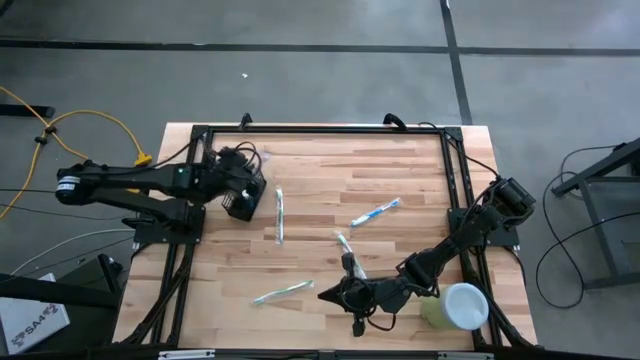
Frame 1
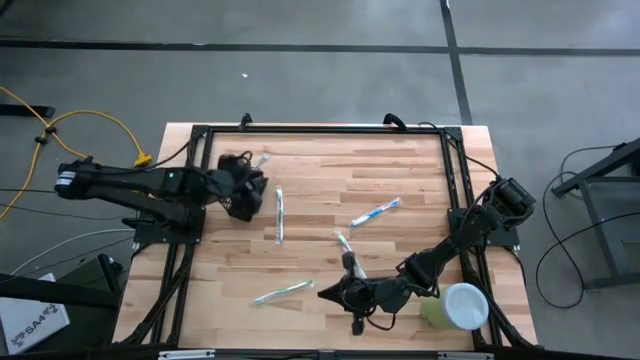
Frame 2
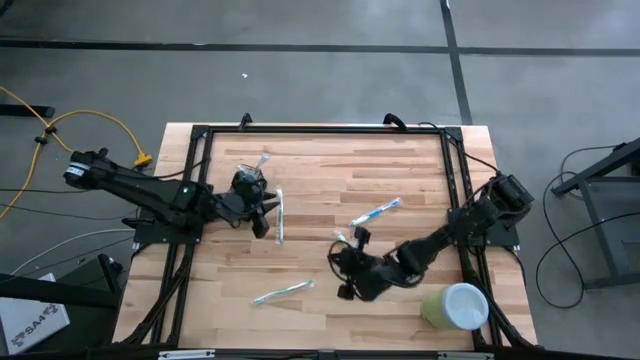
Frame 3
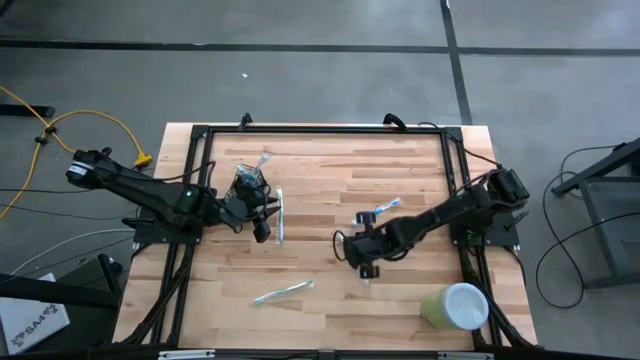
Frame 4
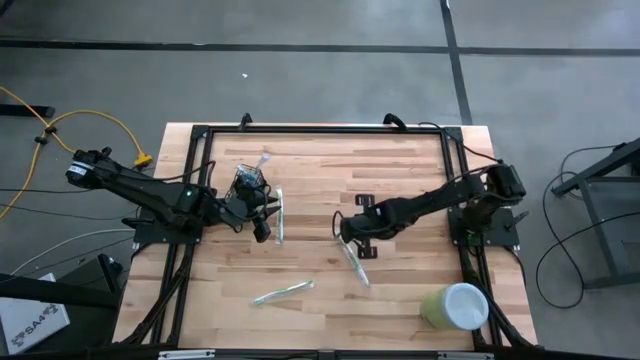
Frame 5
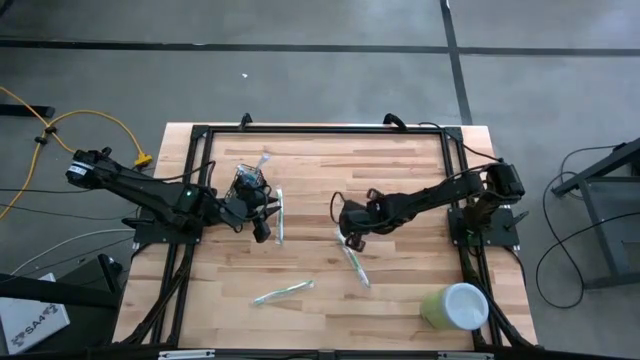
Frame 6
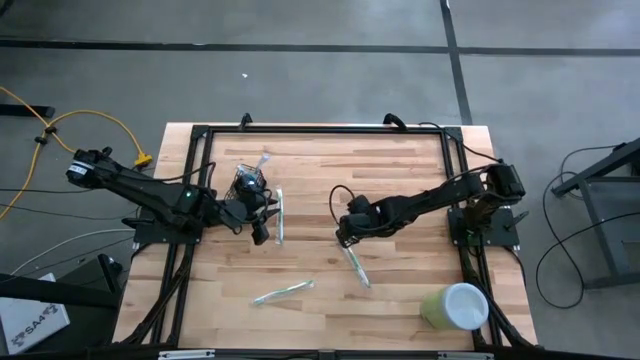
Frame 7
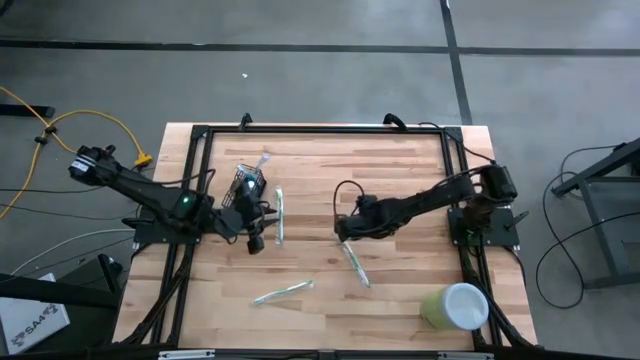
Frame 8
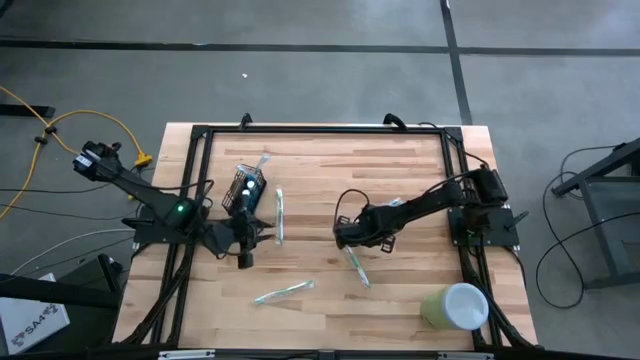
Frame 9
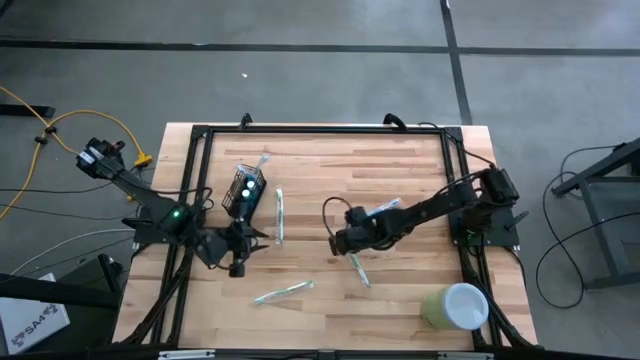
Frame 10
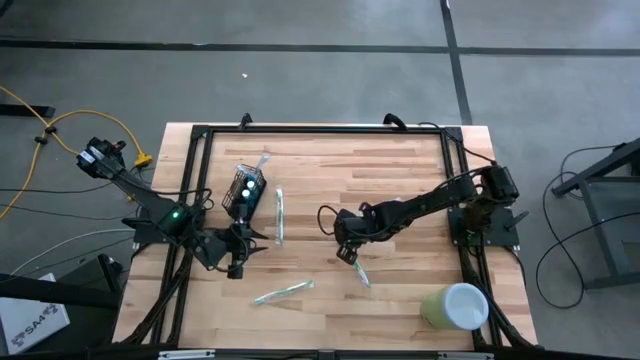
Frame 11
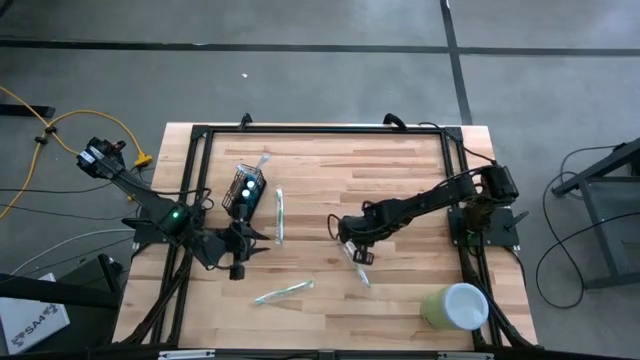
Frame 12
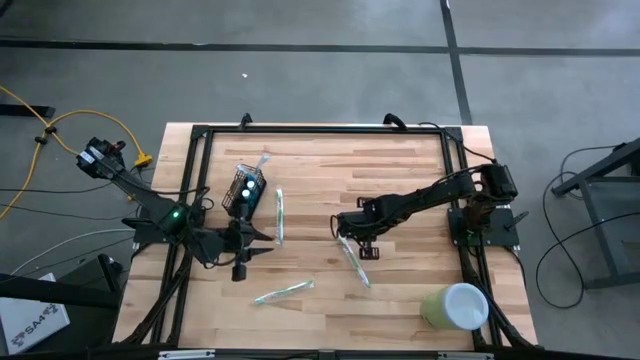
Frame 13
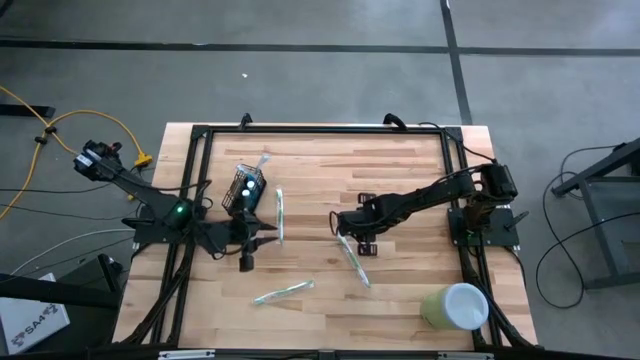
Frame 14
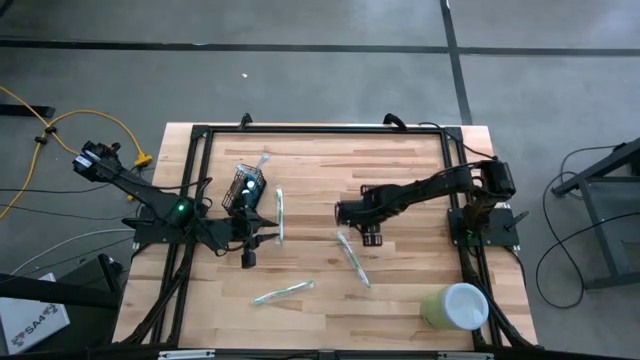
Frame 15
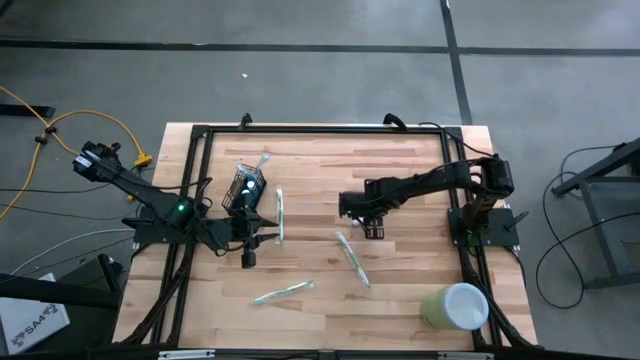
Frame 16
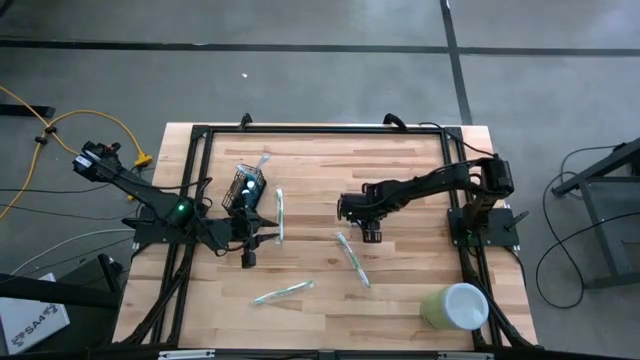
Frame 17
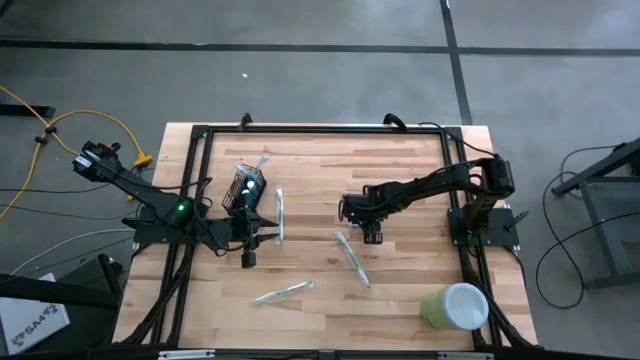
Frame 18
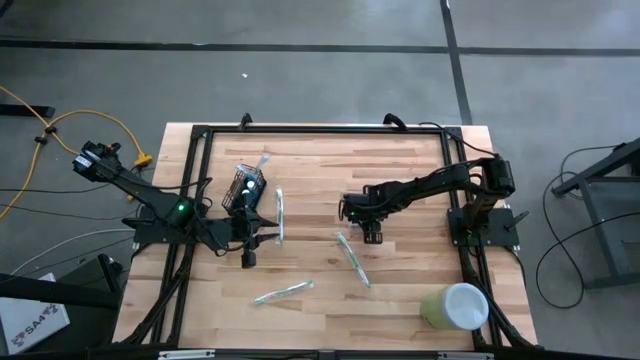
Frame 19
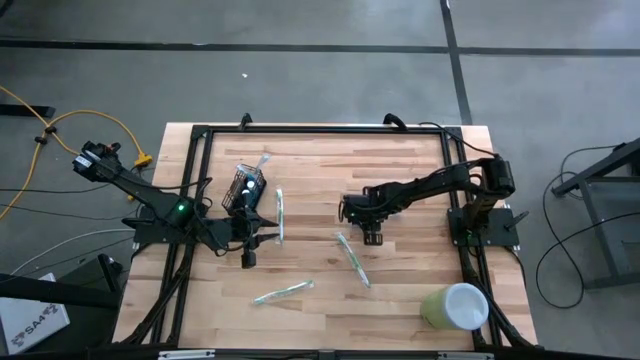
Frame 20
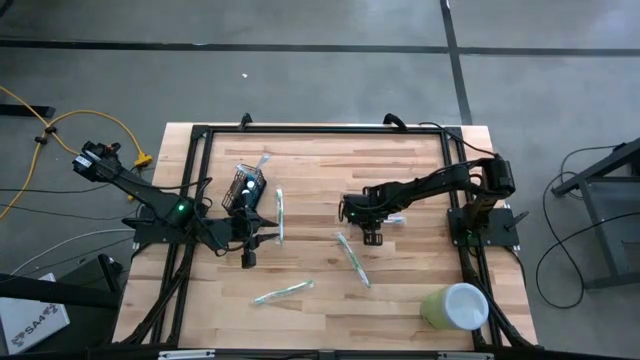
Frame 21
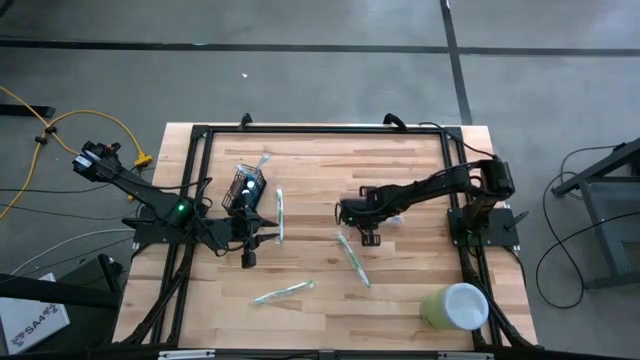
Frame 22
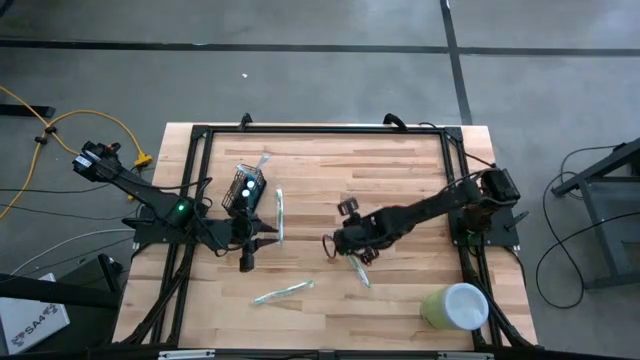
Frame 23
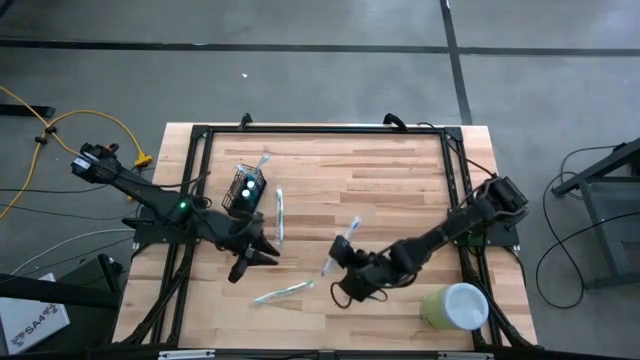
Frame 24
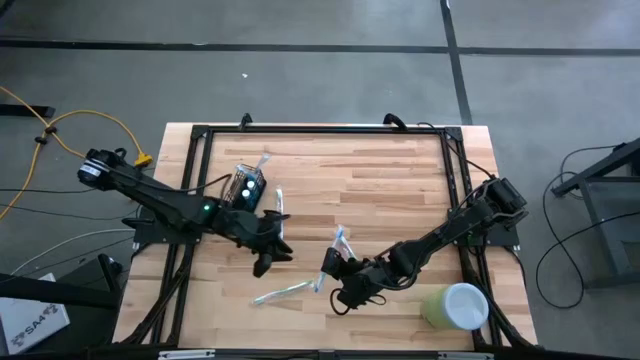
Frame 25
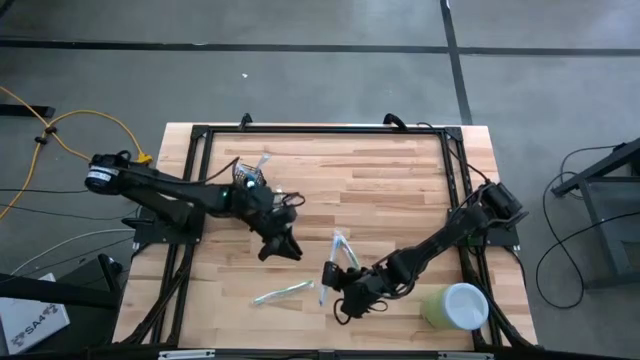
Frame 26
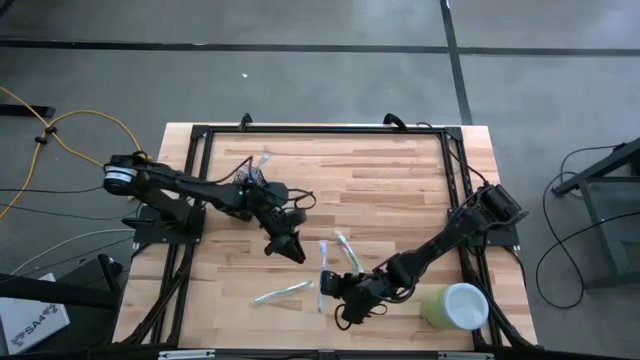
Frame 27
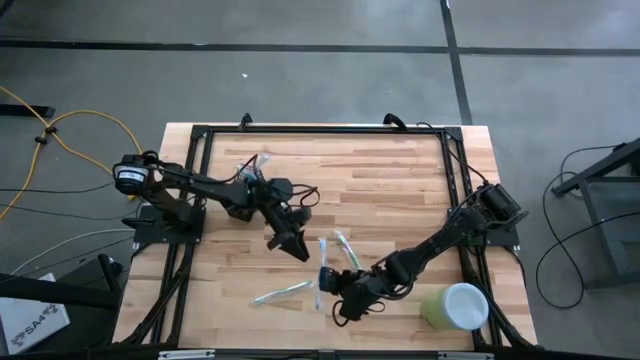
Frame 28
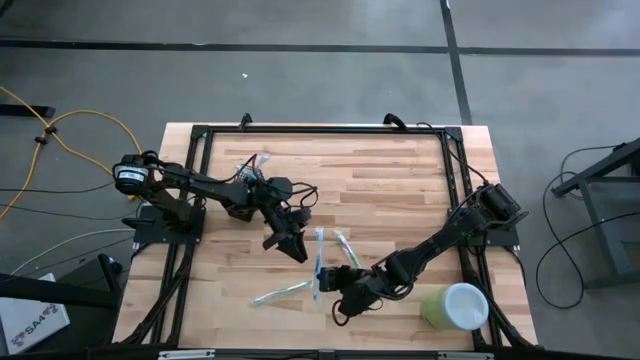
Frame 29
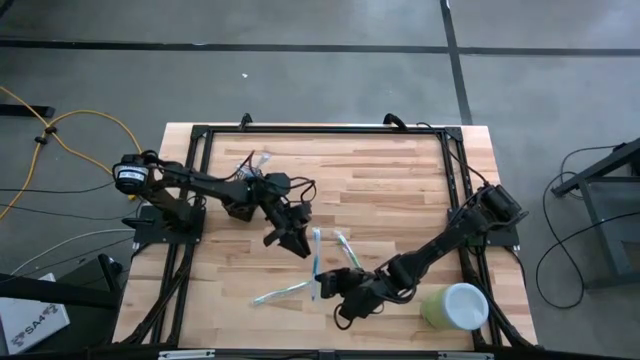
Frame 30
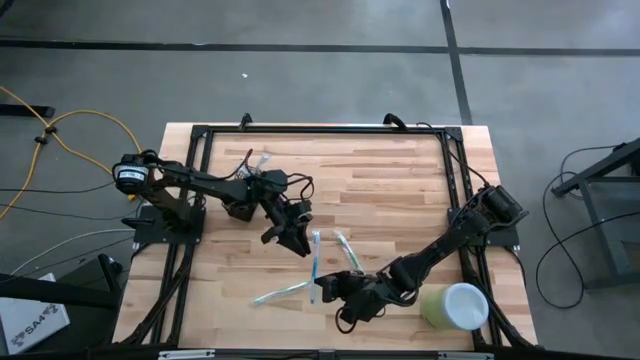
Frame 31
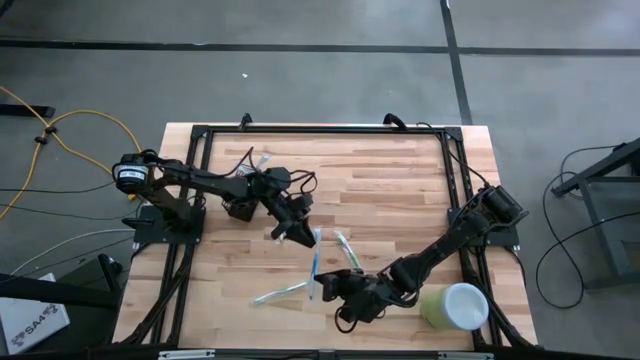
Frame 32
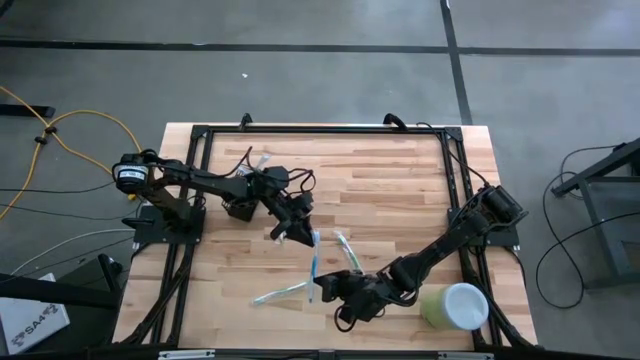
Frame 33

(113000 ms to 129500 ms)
Task: Pick & Place toothbrushing station
Put the blue toothbrush into the black wire organizer

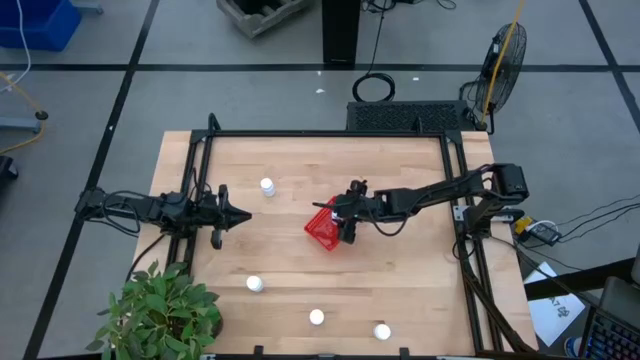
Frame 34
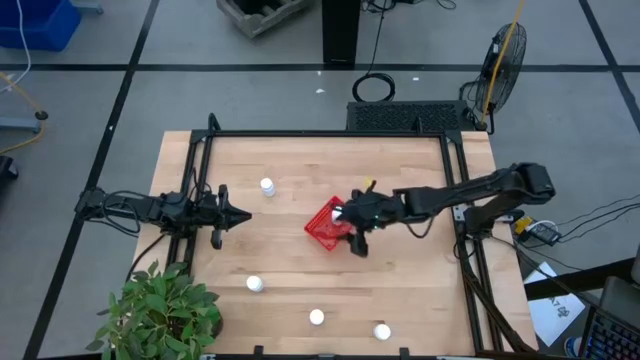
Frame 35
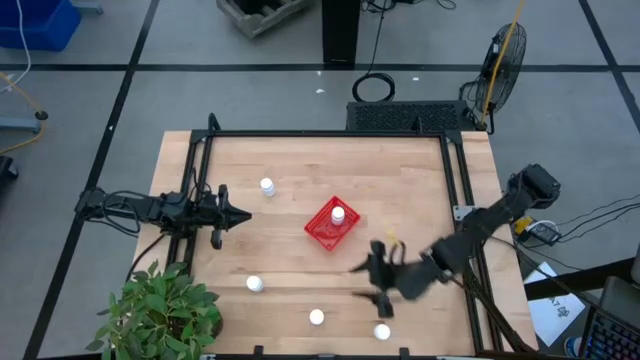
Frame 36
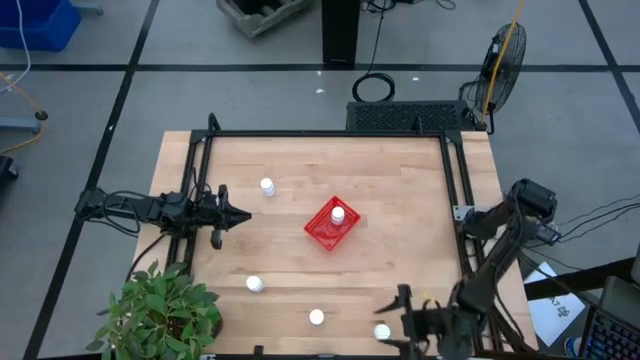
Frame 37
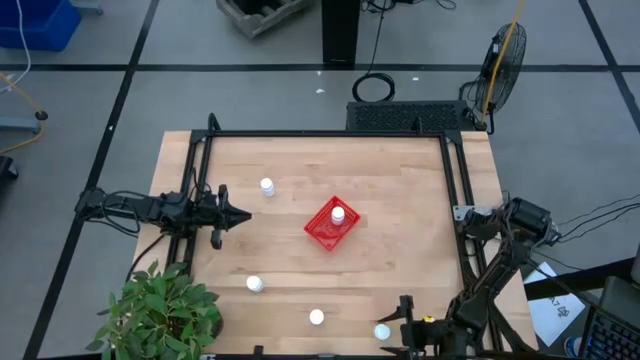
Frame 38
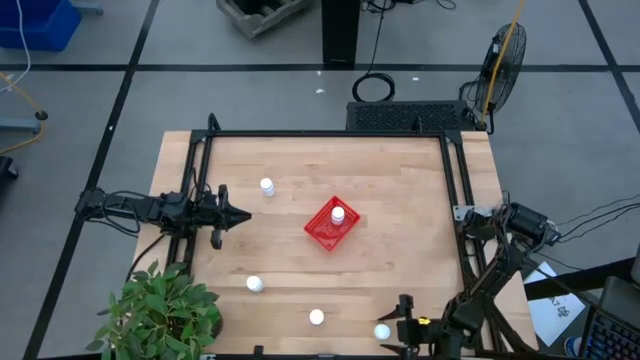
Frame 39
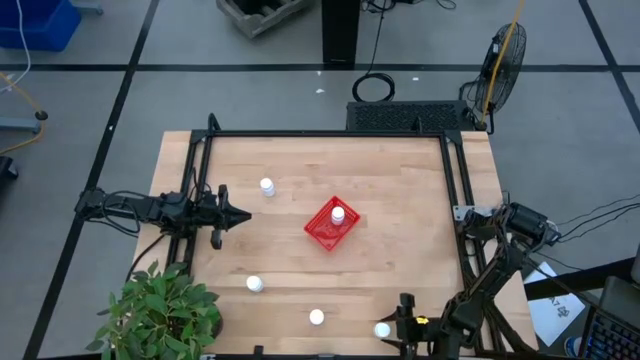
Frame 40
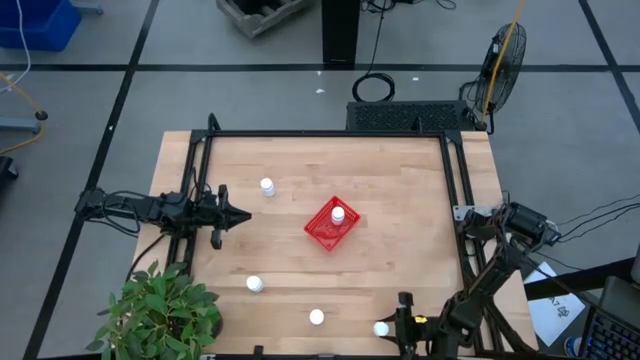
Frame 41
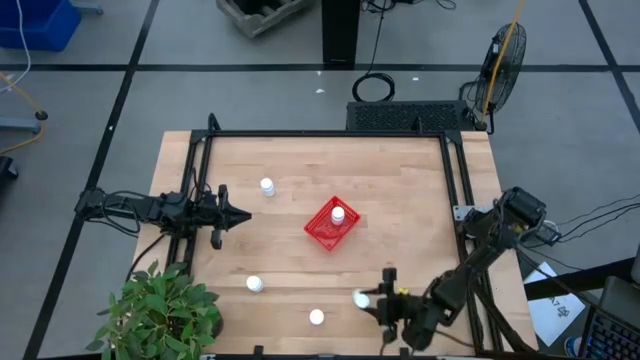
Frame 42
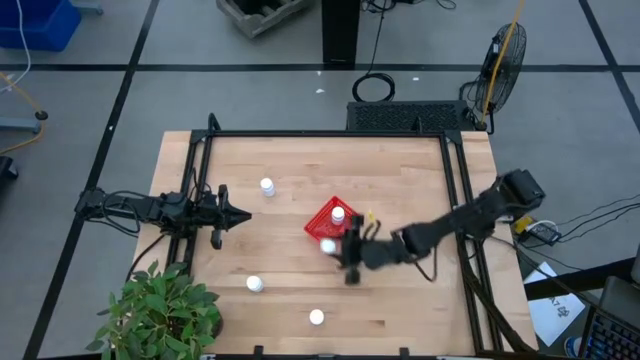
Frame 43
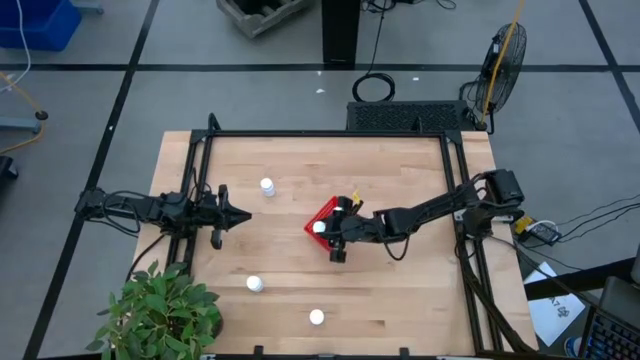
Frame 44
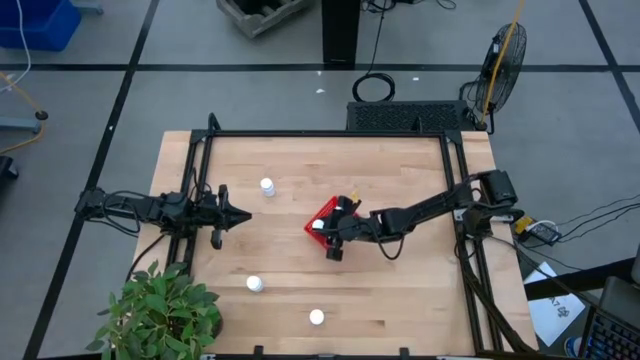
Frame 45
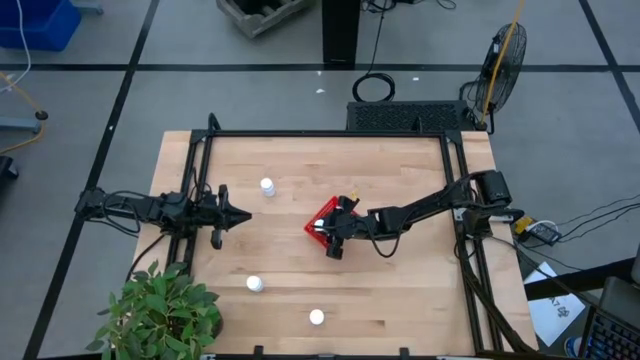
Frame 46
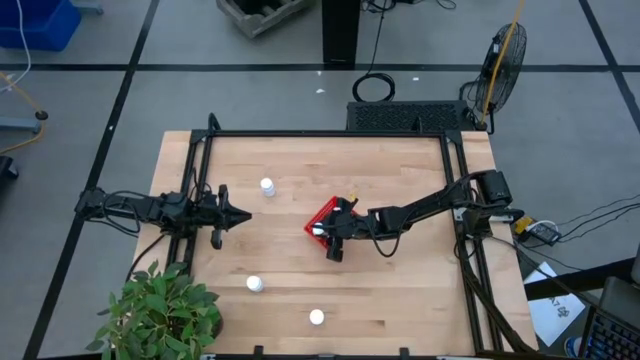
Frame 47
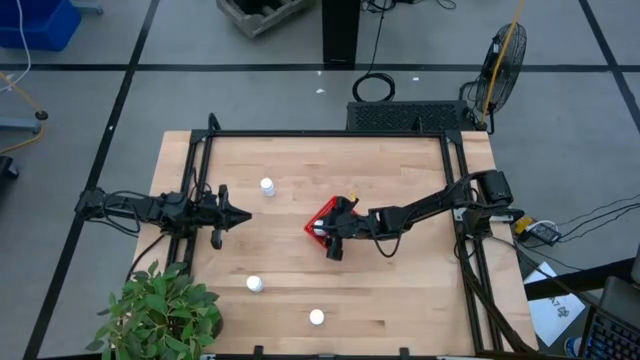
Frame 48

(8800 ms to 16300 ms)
Task: Pick and place pill bottles into a basket
Put the white medicine bottle into the red bin
